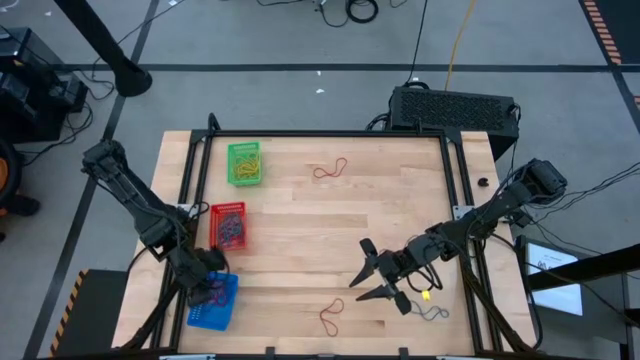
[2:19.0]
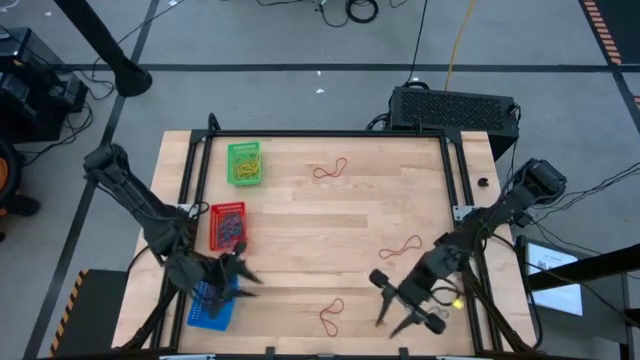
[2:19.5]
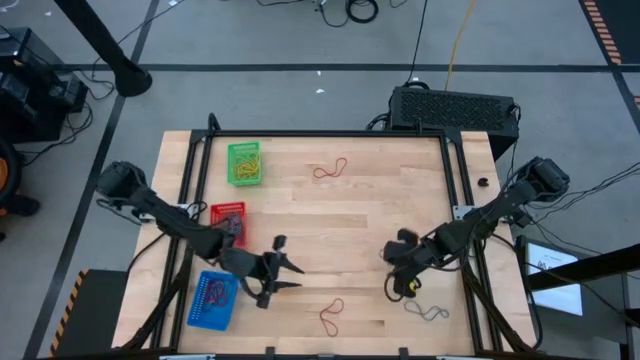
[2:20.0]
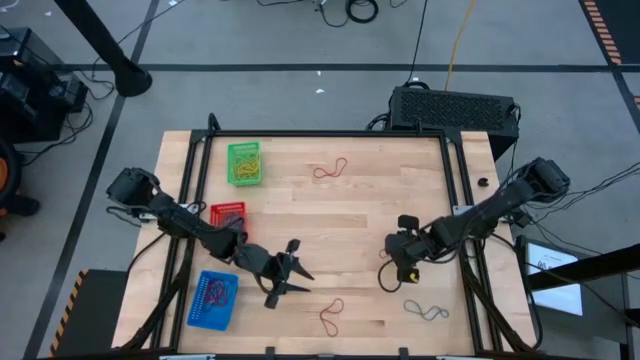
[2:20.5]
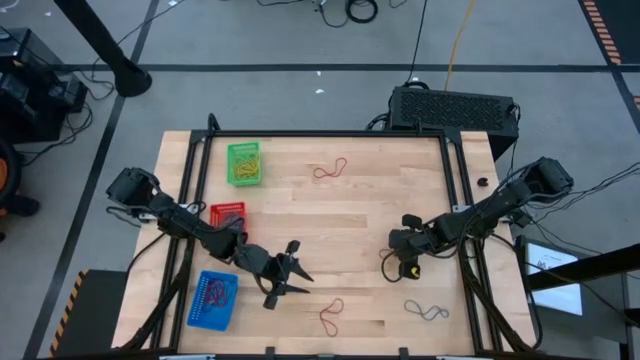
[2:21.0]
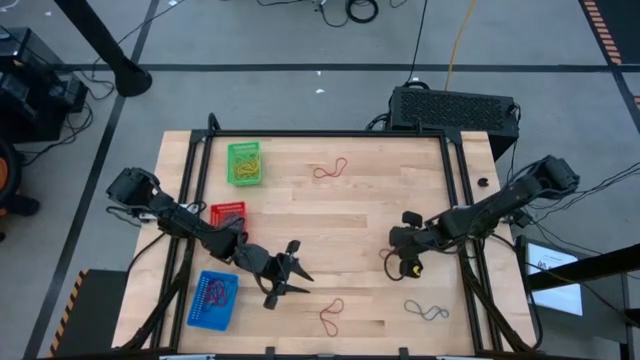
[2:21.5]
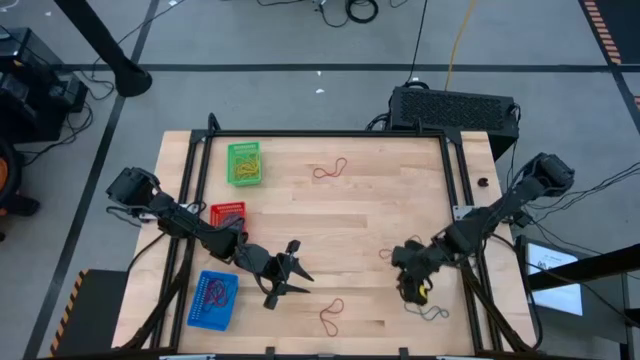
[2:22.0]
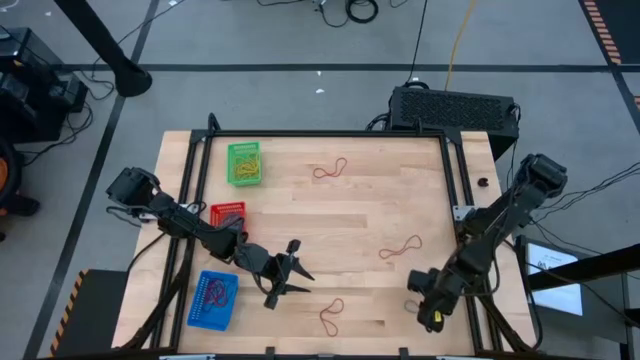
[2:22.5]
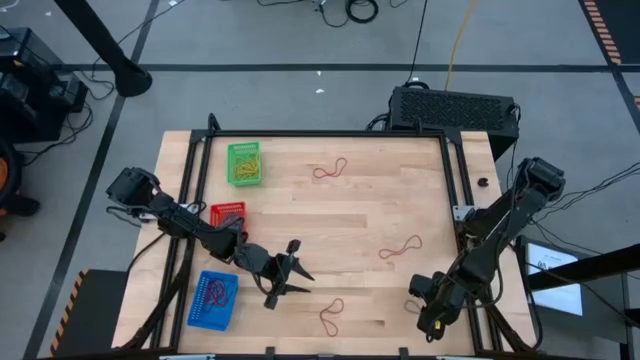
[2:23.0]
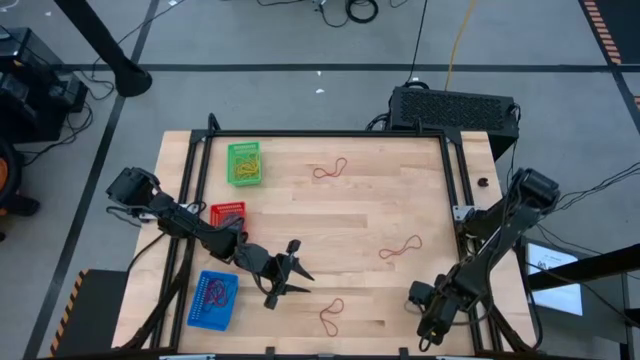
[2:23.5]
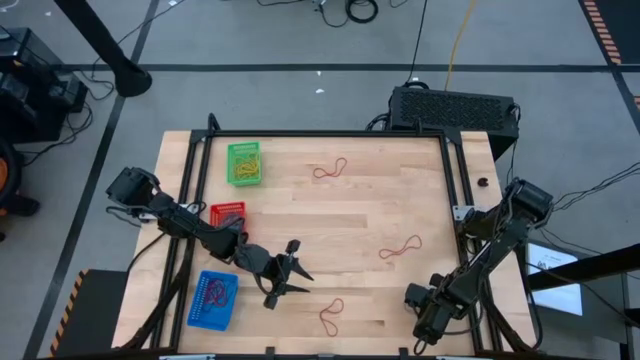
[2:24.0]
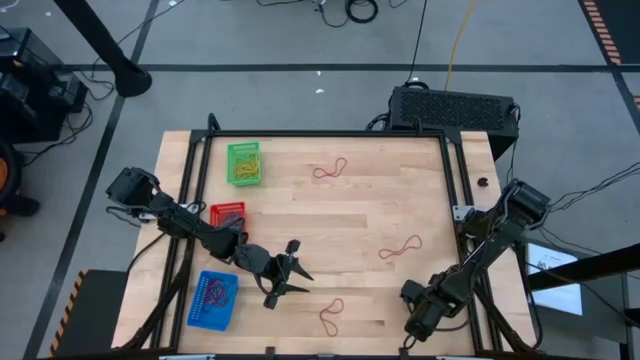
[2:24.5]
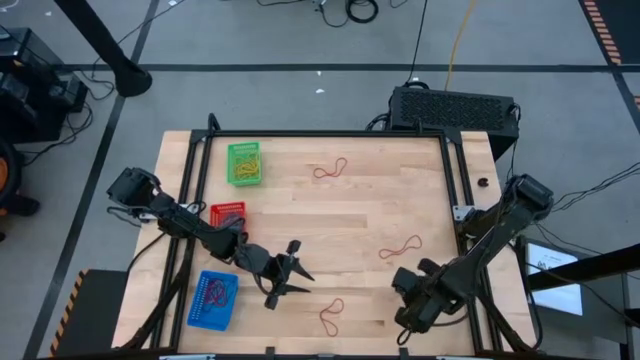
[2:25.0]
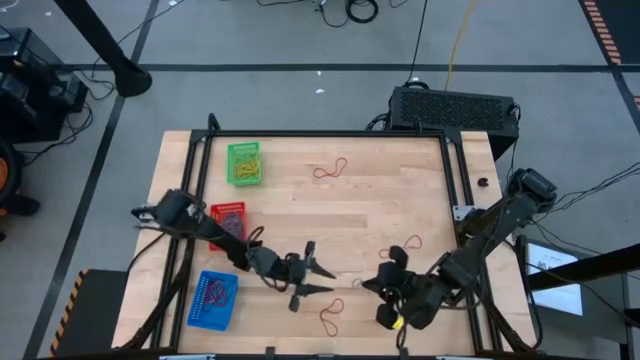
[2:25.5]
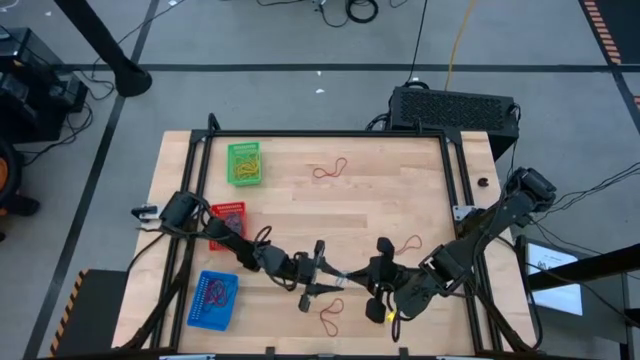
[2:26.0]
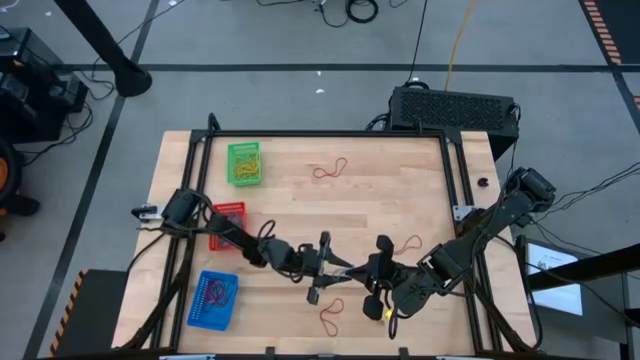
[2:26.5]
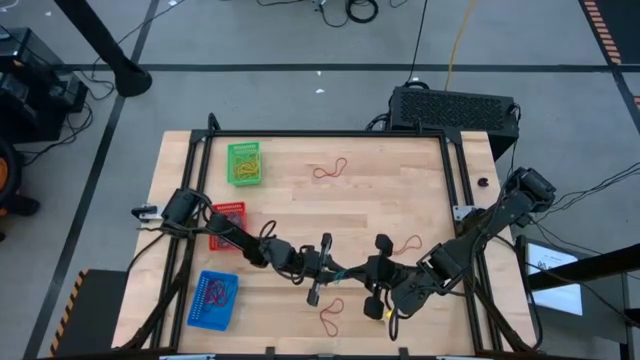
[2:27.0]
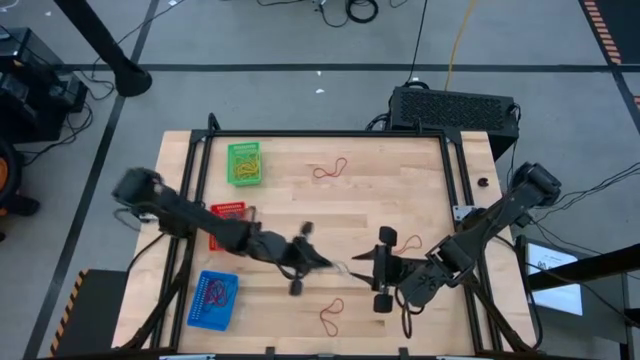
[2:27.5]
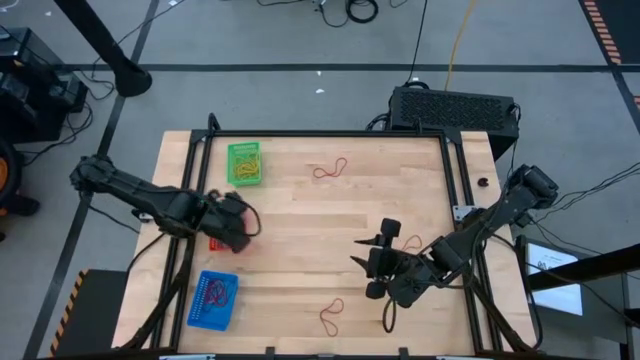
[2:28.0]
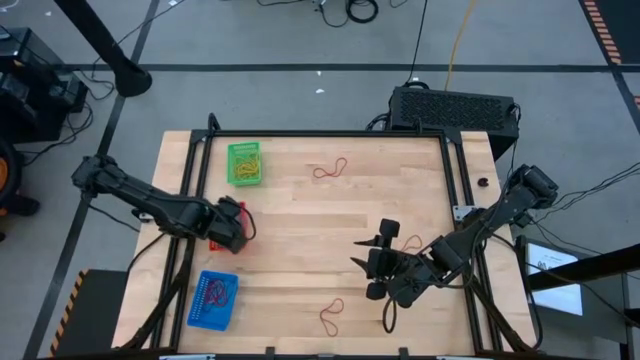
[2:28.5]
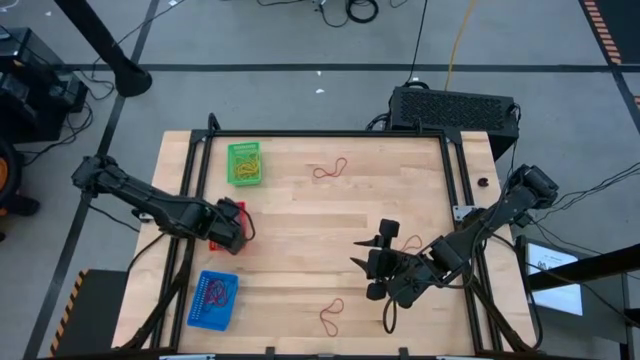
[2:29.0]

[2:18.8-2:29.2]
Task: Sort rubber bands into baskets
Put the blue rubber band into the red bin

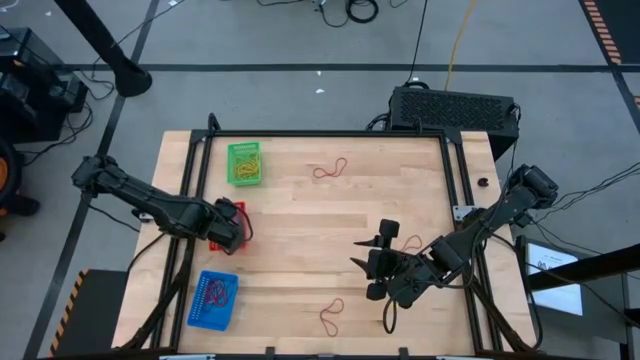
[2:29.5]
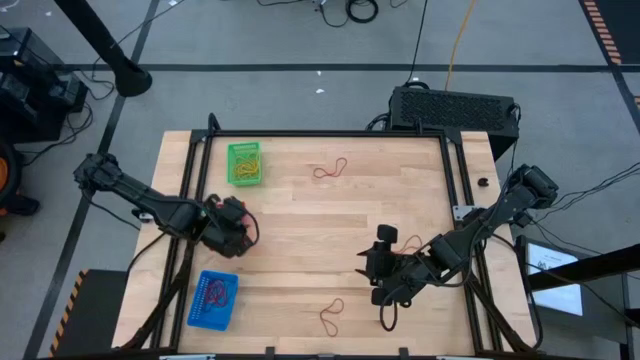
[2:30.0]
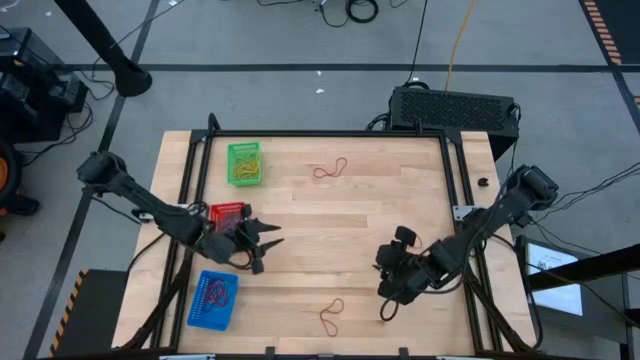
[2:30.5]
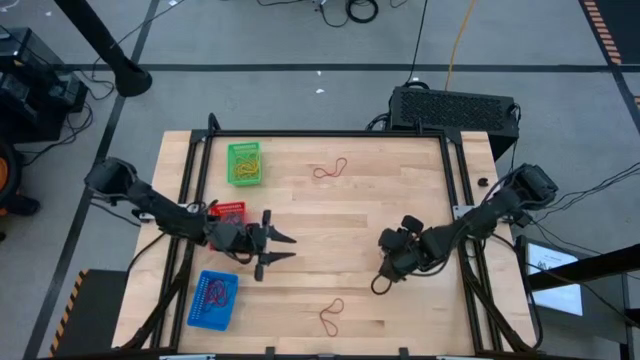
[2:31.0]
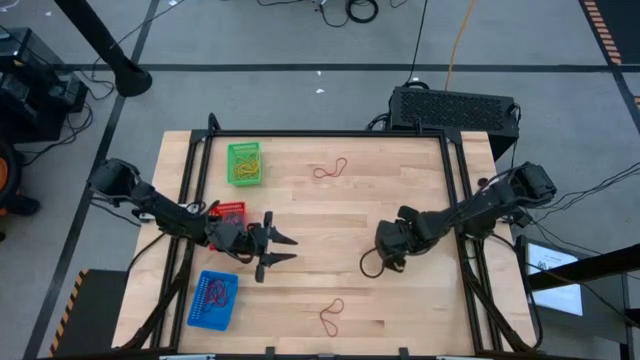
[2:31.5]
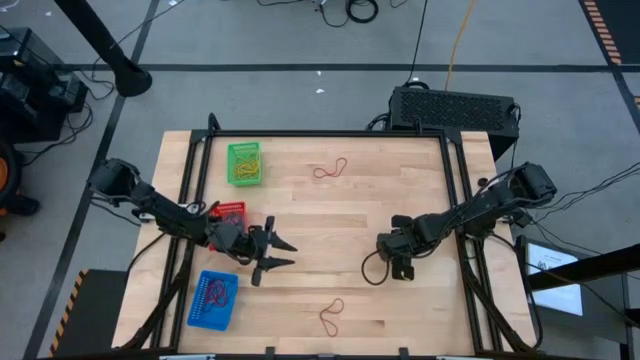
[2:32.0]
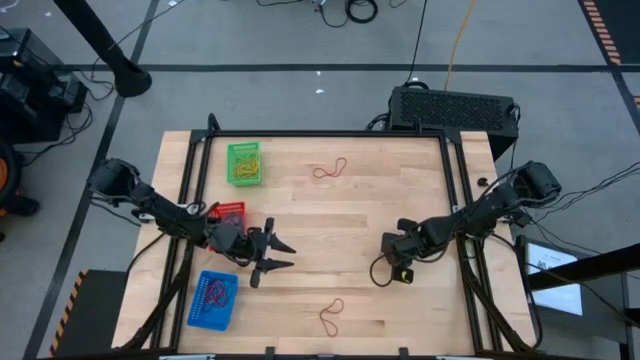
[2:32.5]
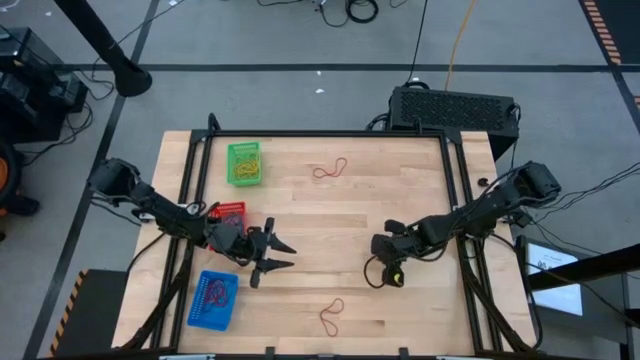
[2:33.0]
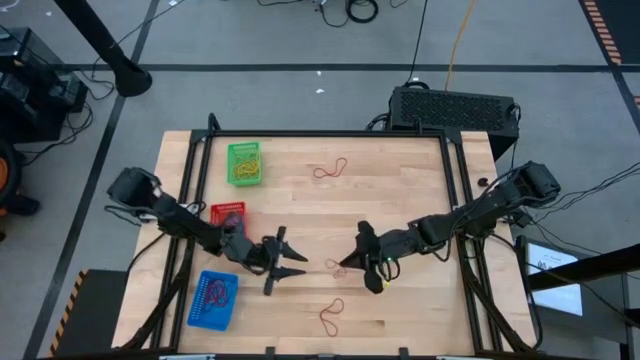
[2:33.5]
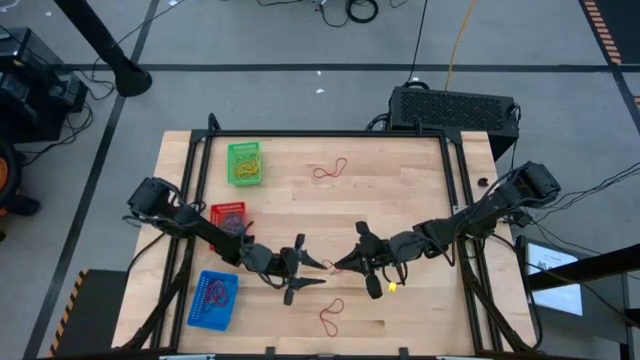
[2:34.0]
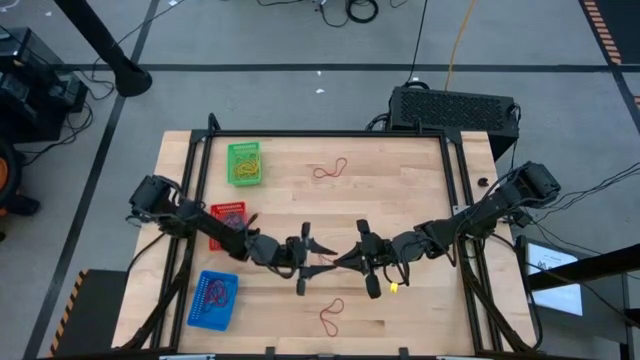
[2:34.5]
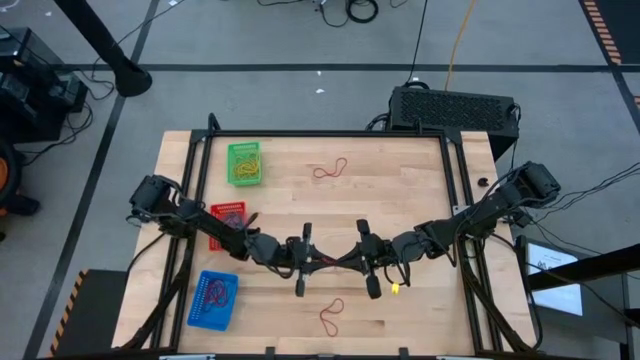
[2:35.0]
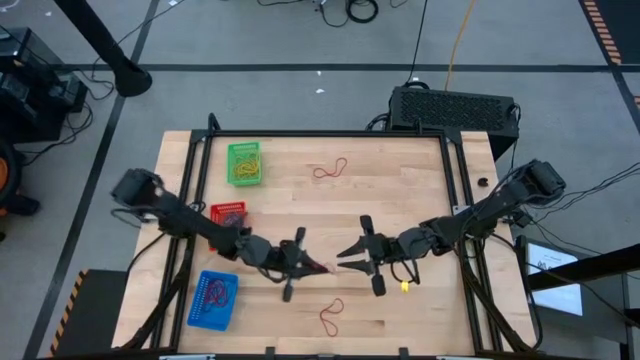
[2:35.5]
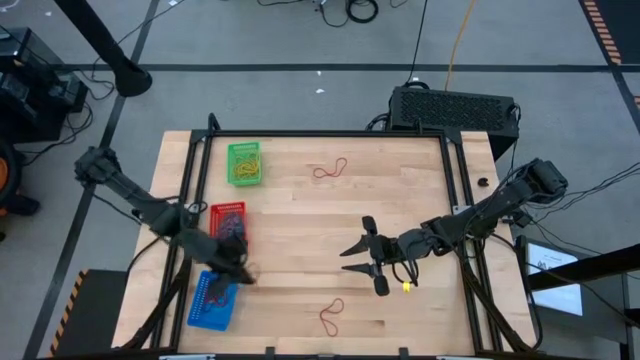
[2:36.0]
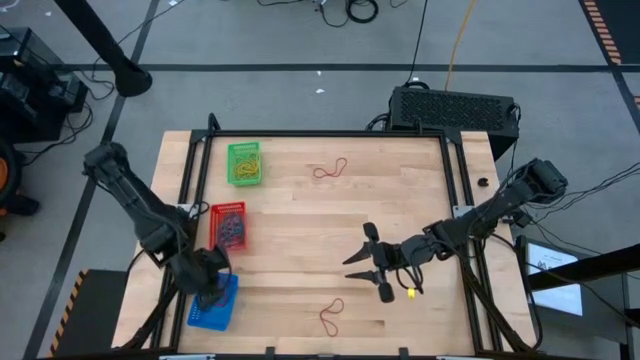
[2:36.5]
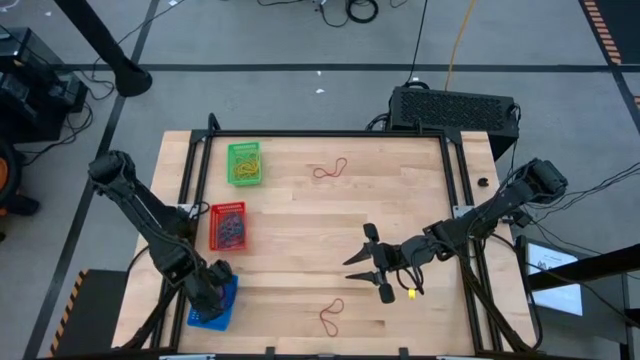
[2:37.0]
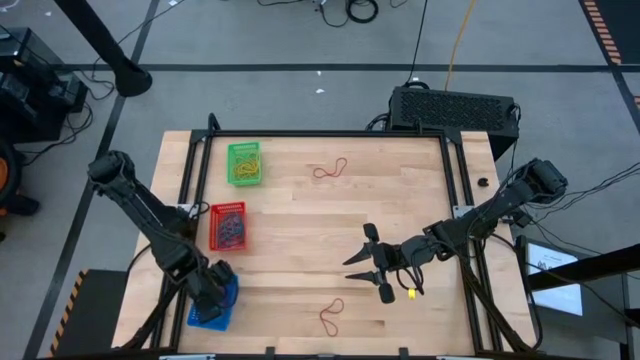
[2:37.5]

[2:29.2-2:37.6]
Put the red rubber band into the blue bin

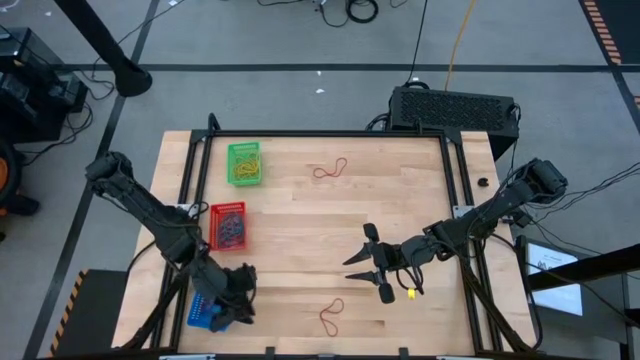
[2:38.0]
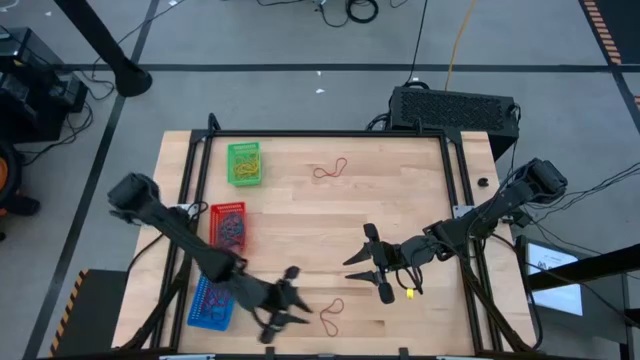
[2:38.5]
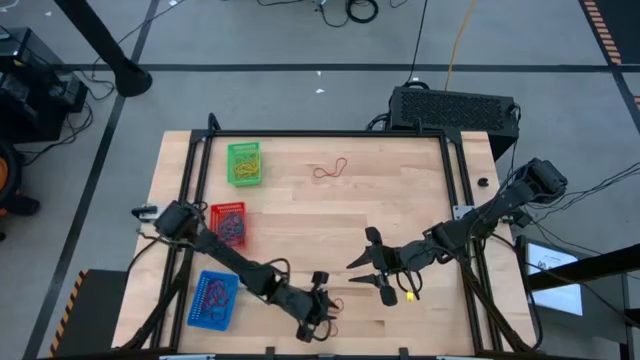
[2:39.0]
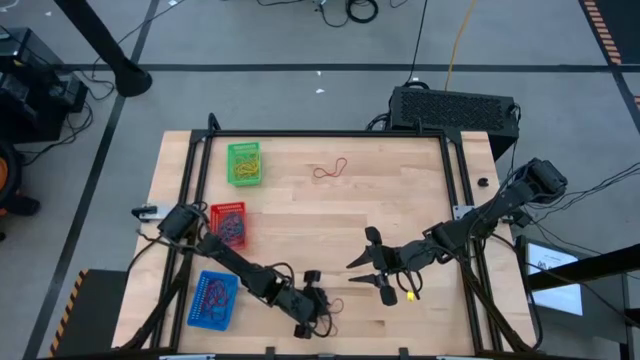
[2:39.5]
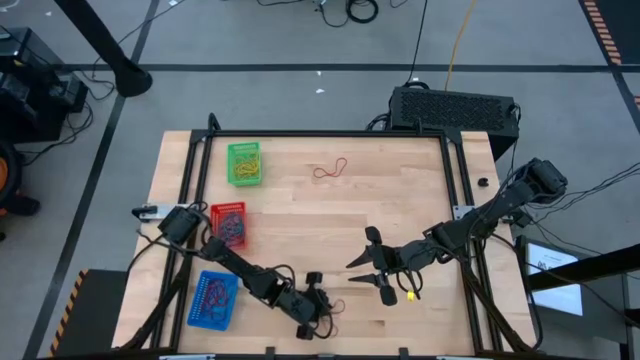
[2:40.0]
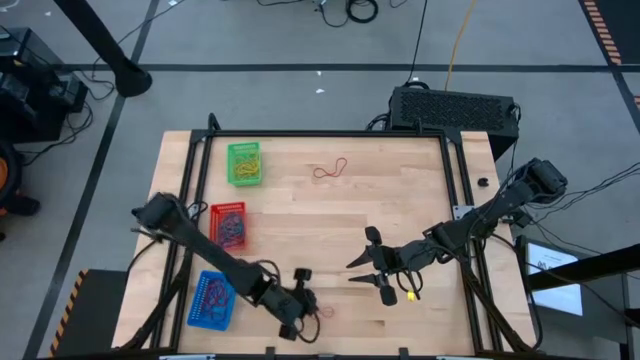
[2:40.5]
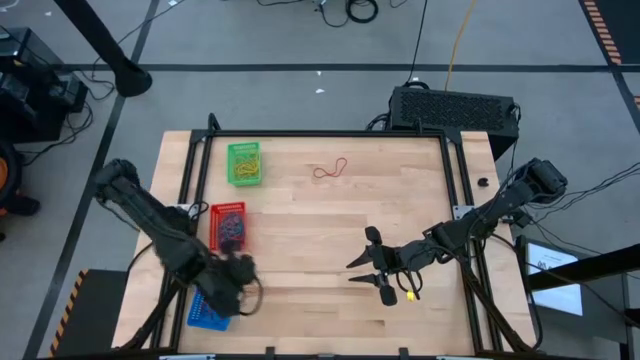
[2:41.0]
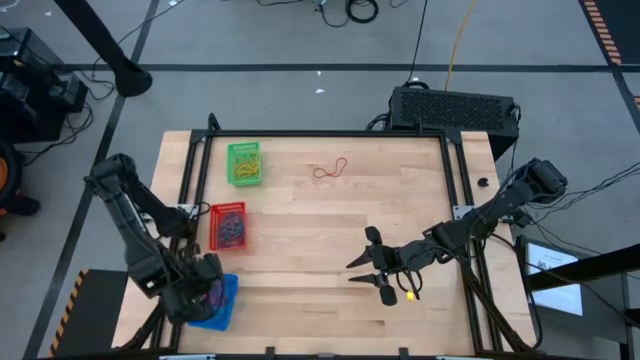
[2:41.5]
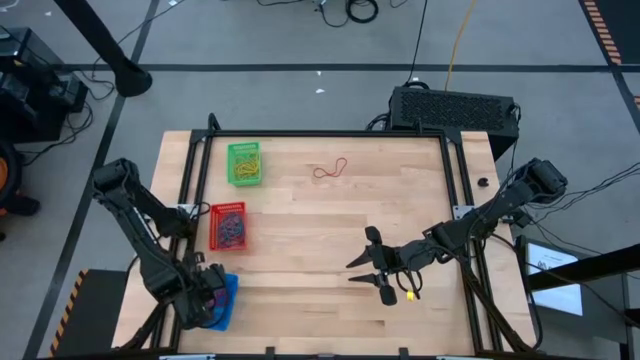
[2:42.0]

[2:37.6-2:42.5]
Put the red rubber band into the blue bin
